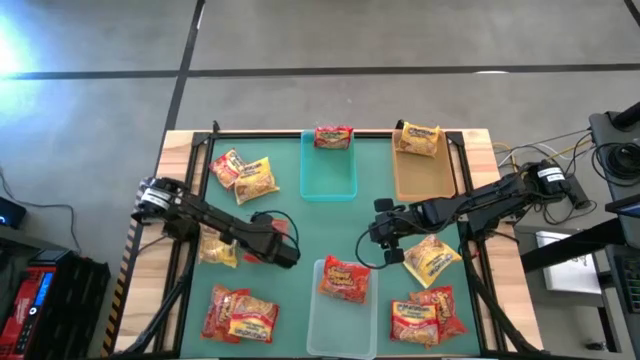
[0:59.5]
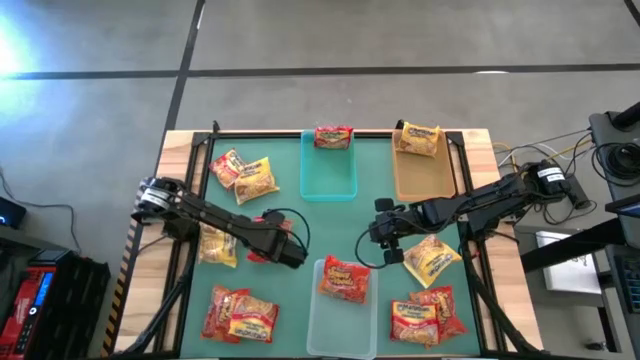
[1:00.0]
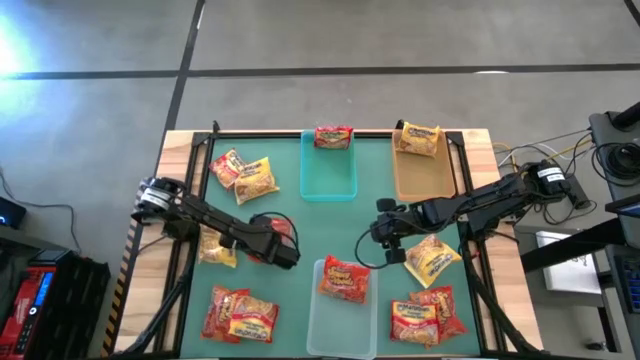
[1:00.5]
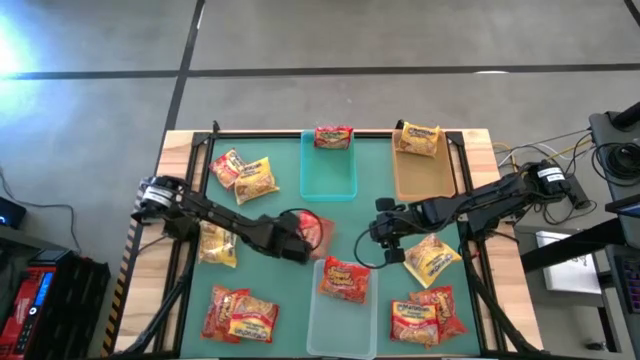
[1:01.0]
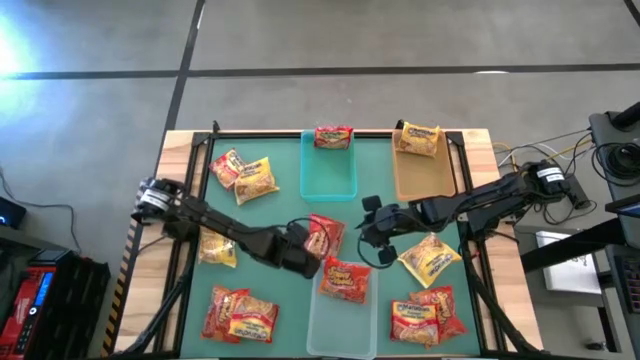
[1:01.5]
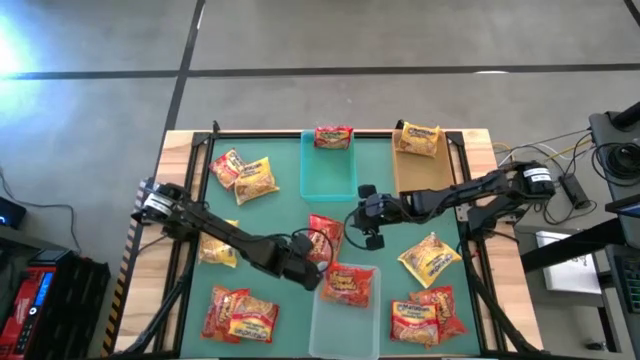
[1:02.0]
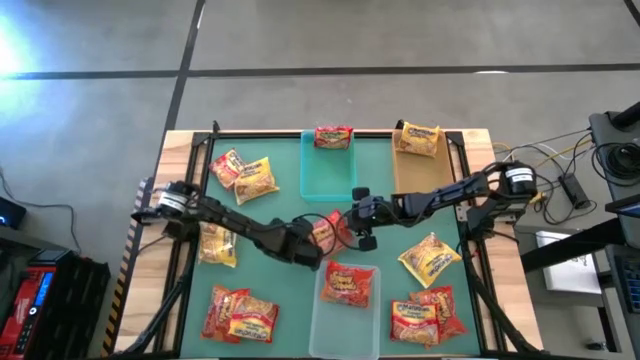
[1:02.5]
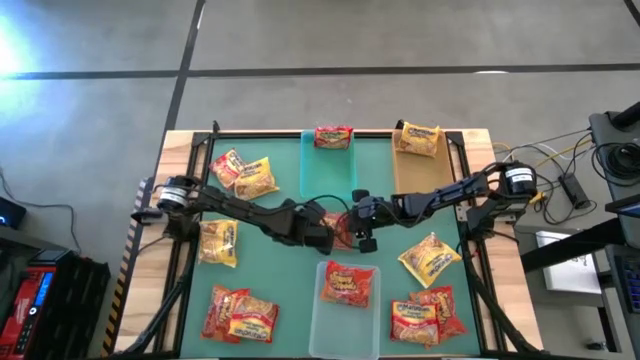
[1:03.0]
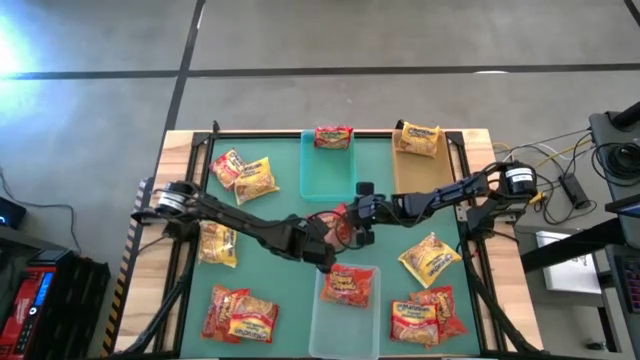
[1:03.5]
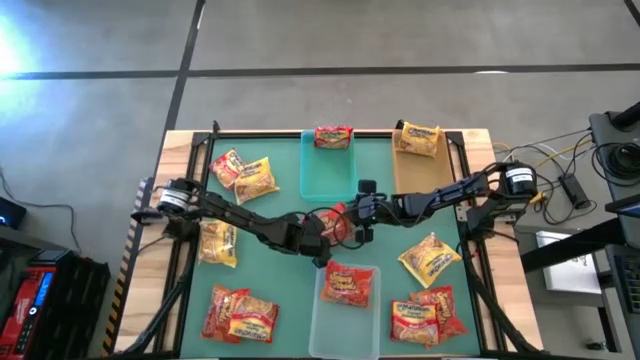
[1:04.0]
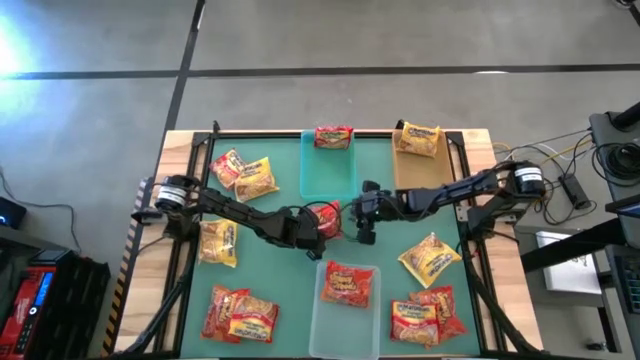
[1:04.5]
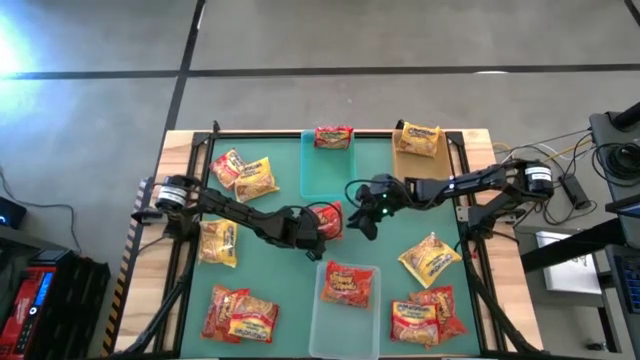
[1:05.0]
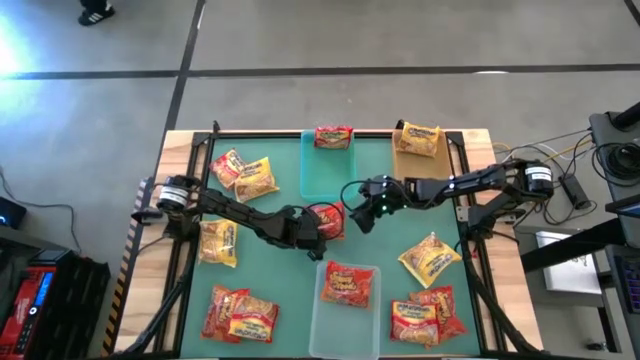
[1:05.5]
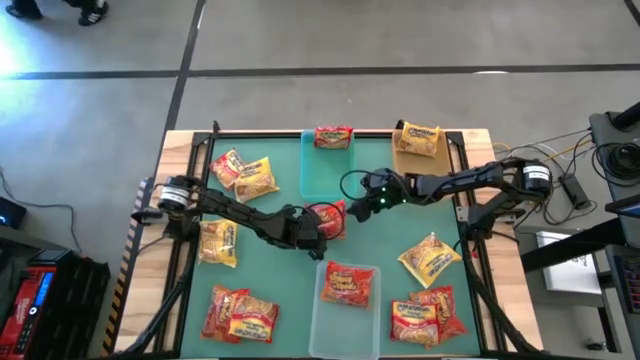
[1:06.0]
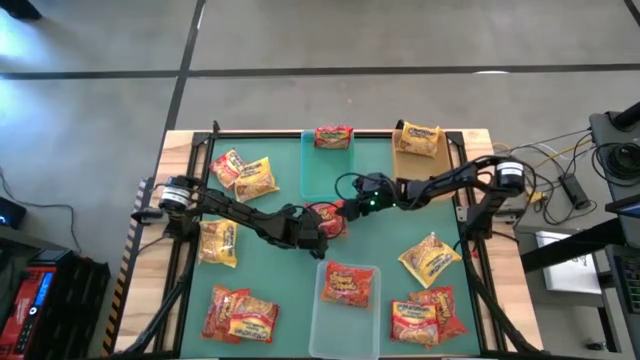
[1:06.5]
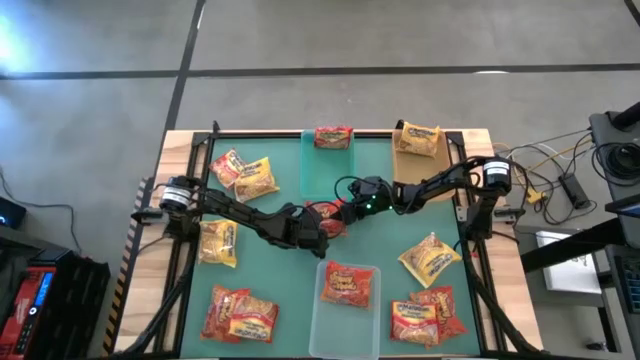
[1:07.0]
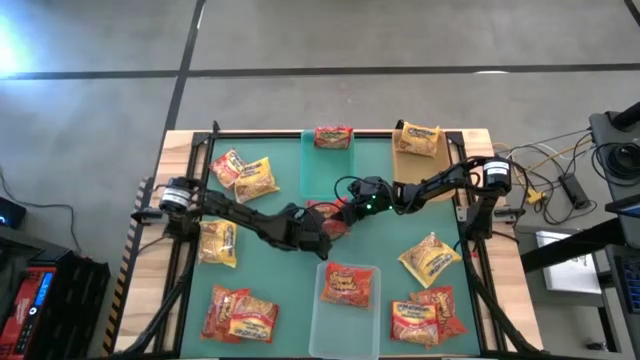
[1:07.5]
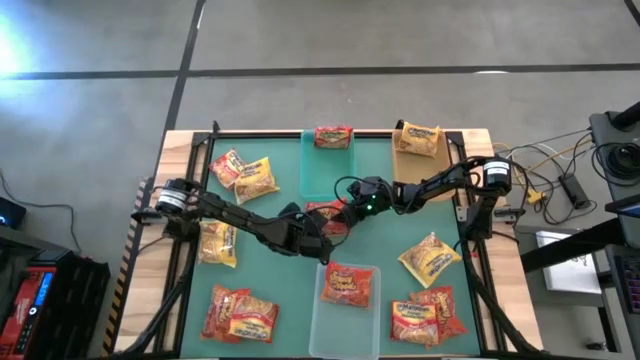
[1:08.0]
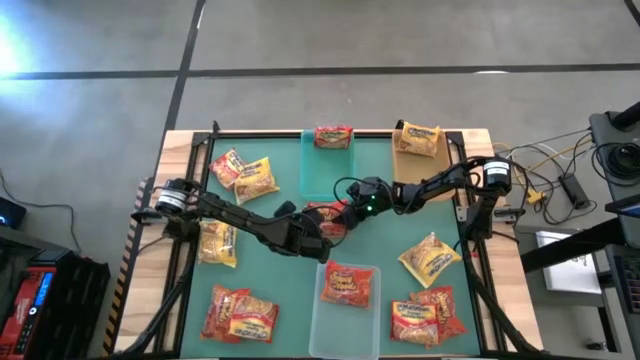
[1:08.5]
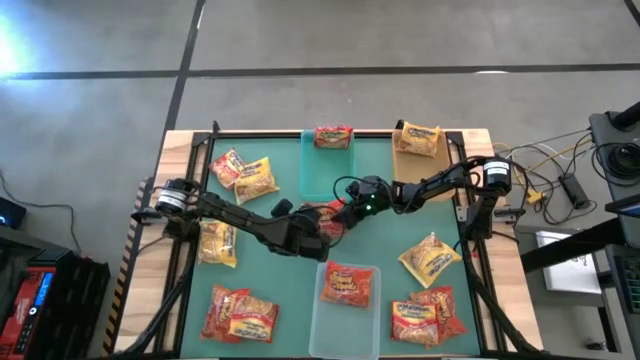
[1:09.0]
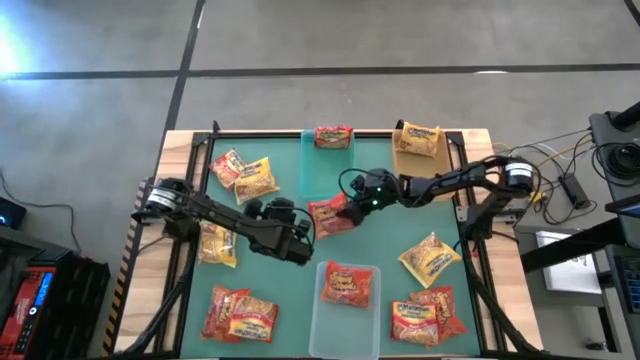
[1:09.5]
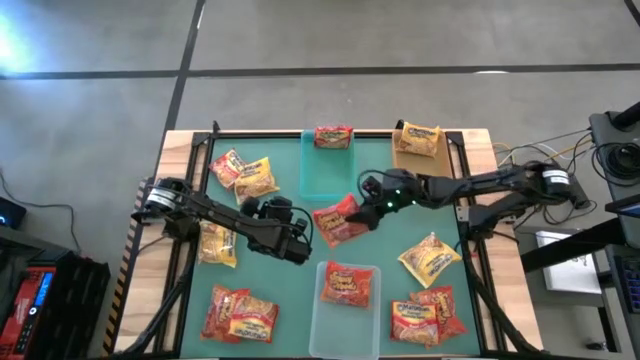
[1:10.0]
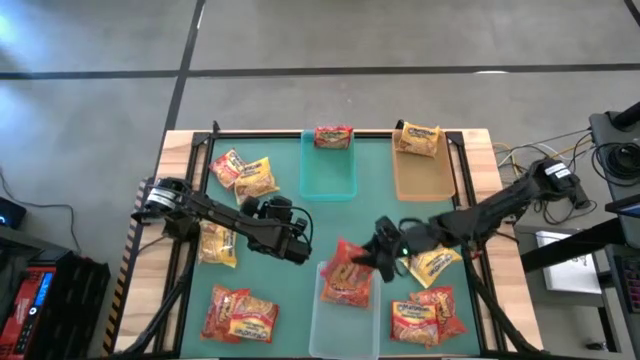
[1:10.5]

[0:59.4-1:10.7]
Task: Sort Maruchan noodles
Put the top left orange noodle pack into the transparent bin

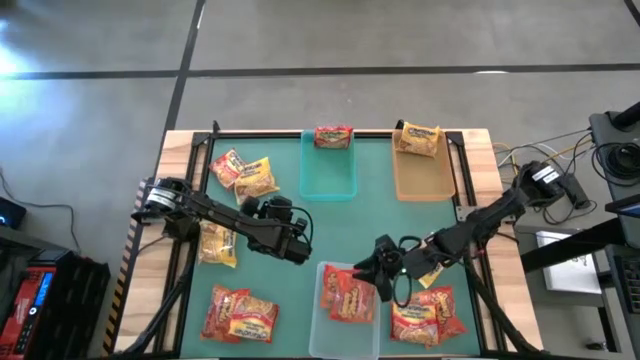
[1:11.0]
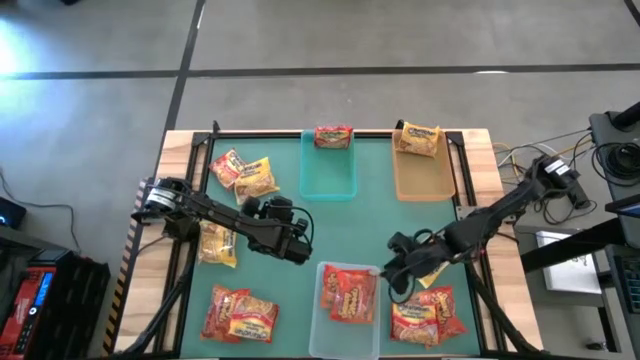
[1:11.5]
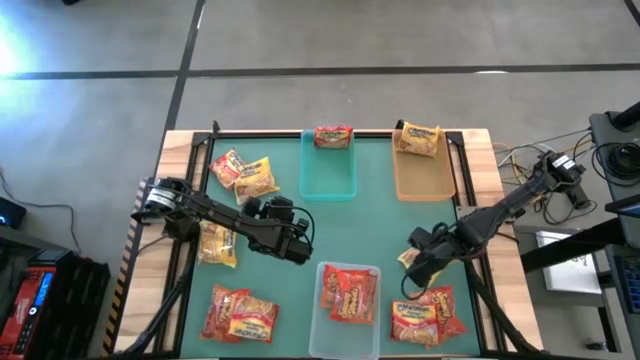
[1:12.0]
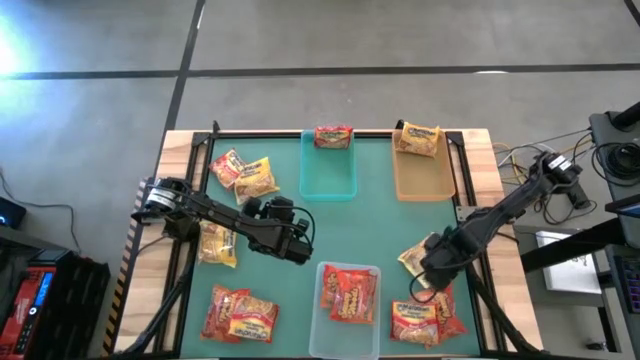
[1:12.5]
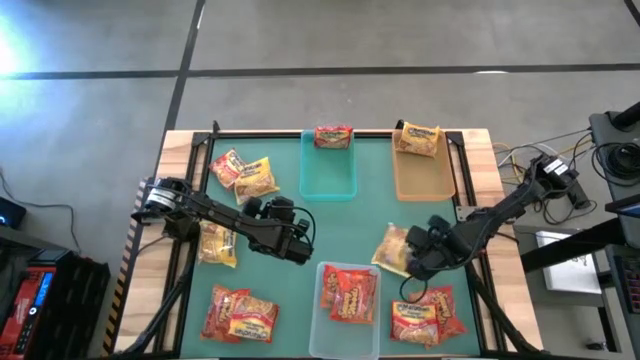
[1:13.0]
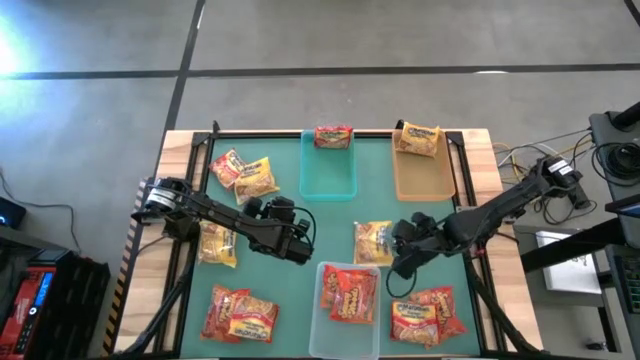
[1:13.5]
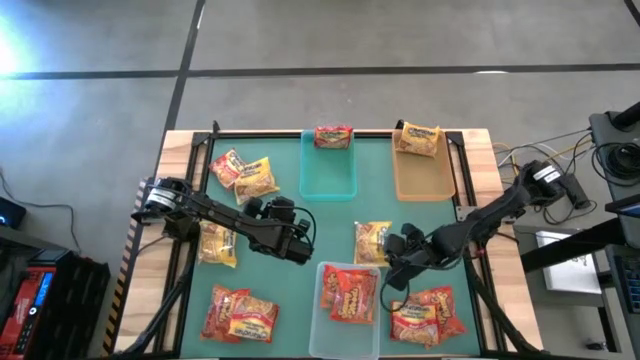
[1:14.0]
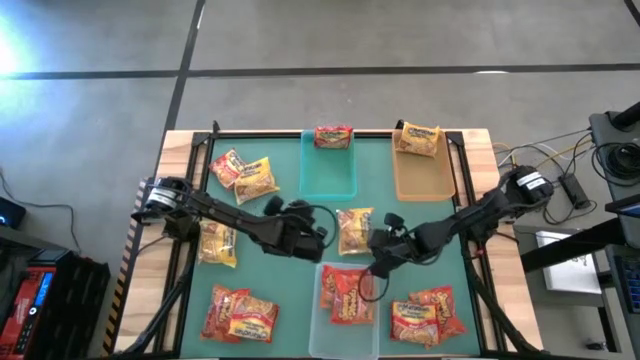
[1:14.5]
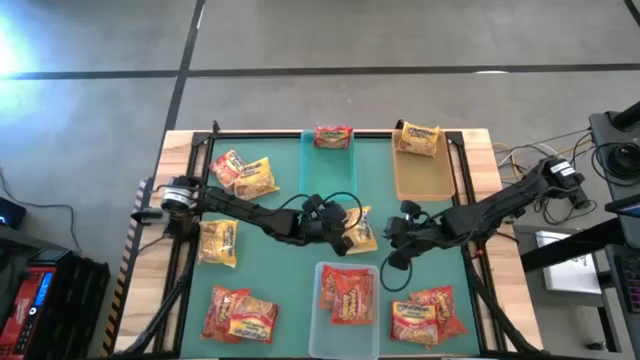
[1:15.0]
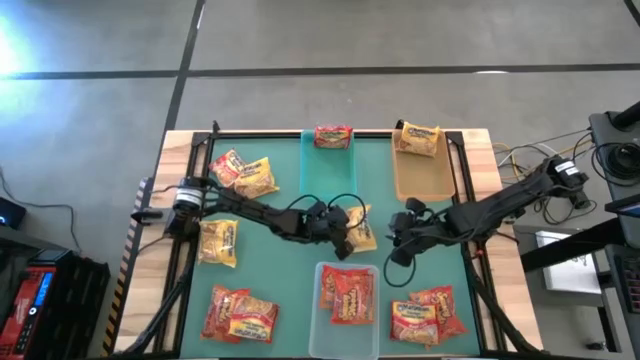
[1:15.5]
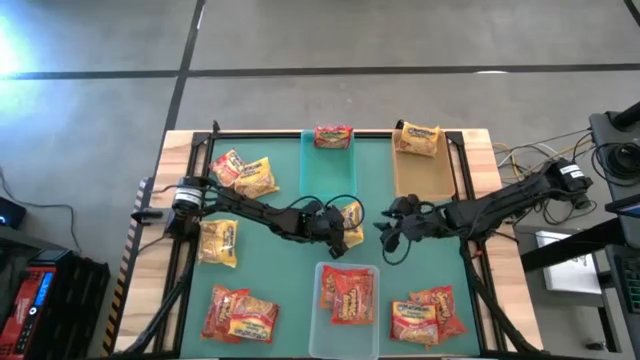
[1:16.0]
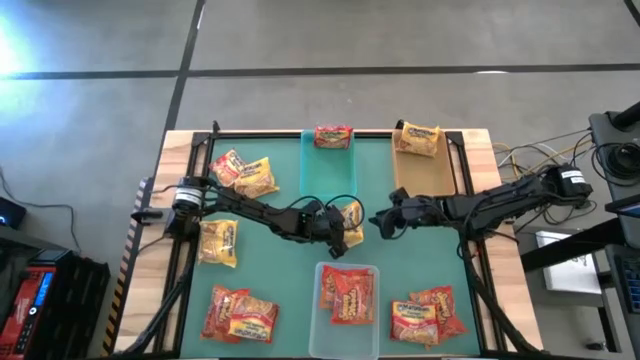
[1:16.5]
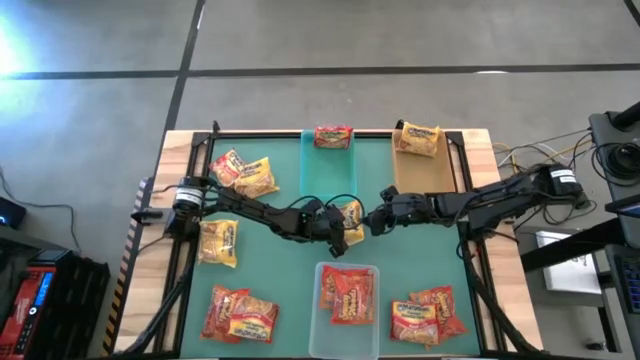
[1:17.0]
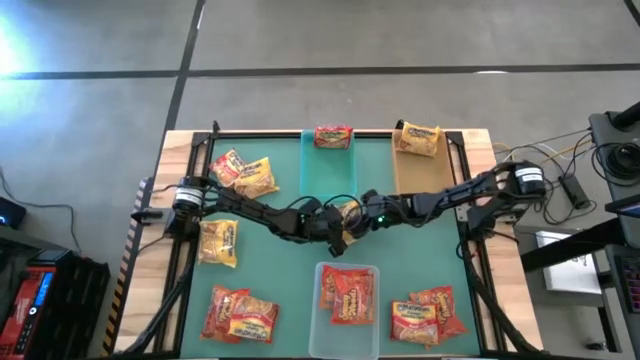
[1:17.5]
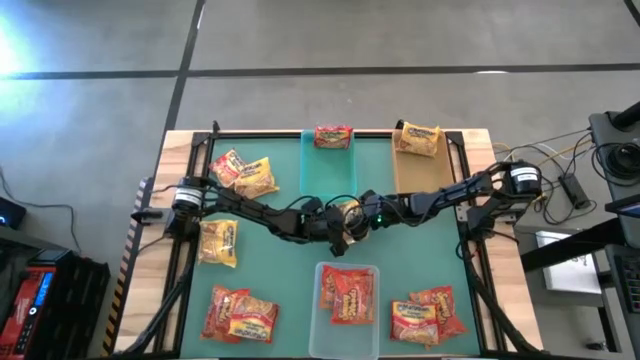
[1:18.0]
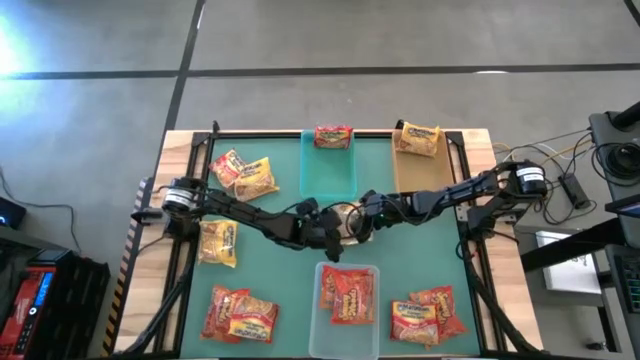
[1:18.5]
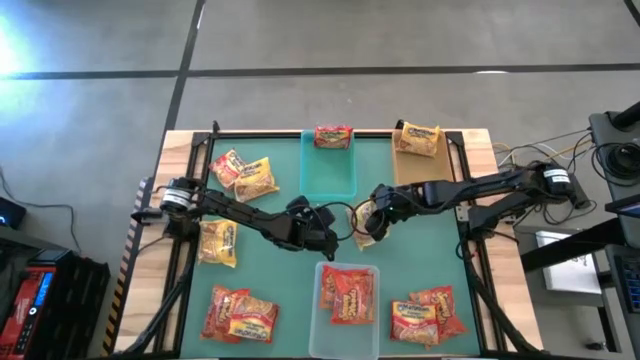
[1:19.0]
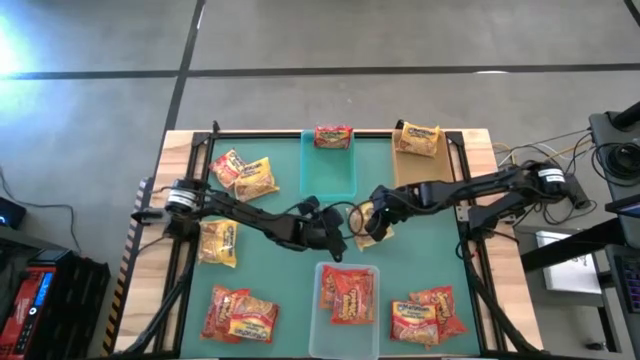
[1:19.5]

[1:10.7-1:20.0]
Put the bottom right yellow noodle pack into the transparent orange bin
